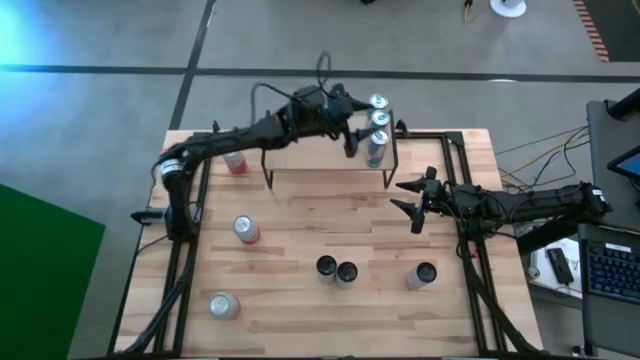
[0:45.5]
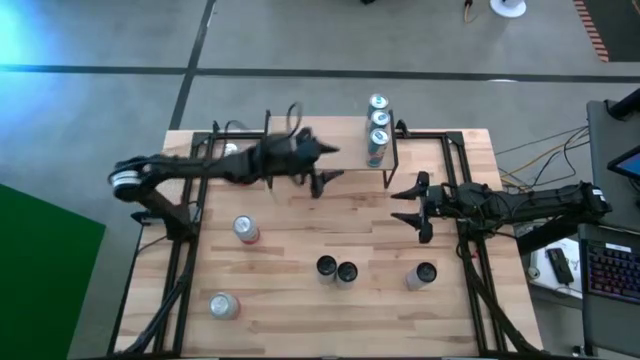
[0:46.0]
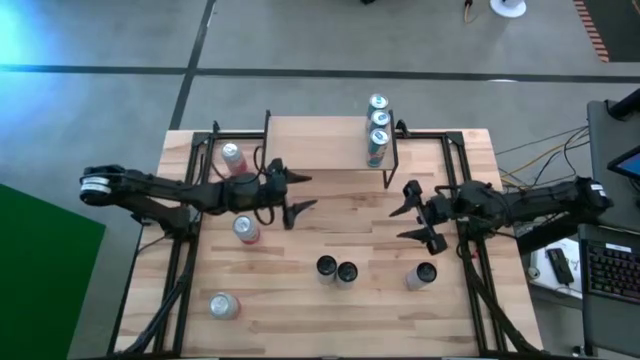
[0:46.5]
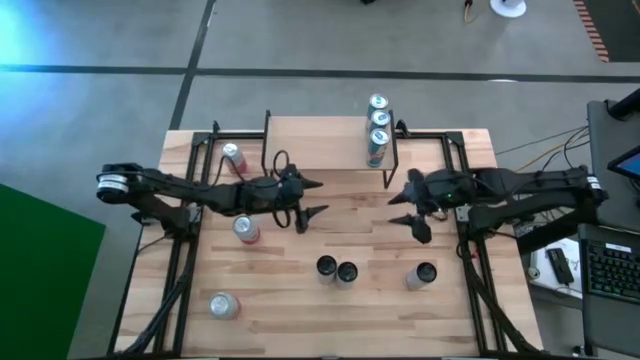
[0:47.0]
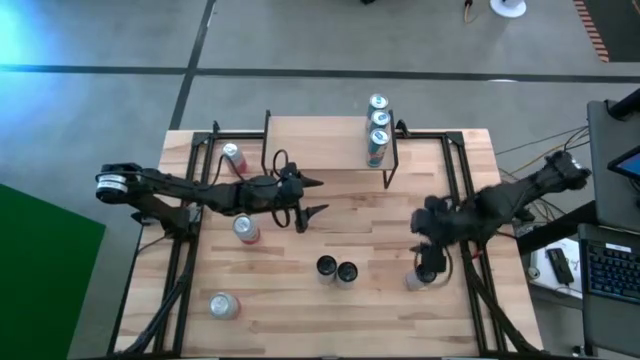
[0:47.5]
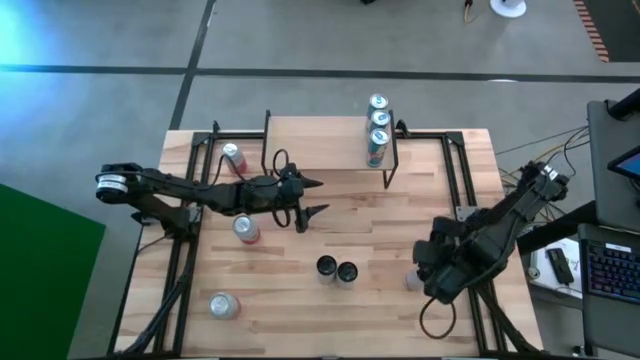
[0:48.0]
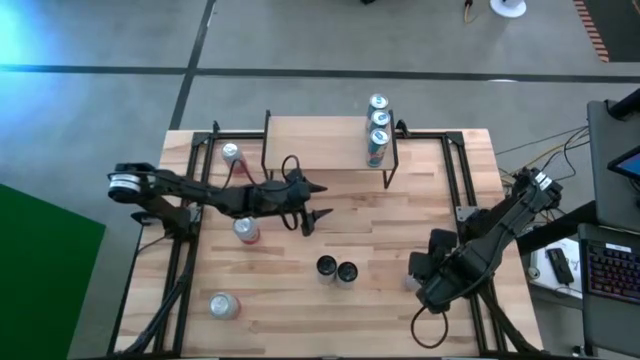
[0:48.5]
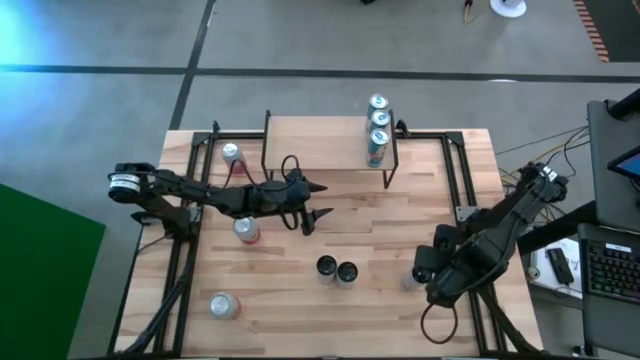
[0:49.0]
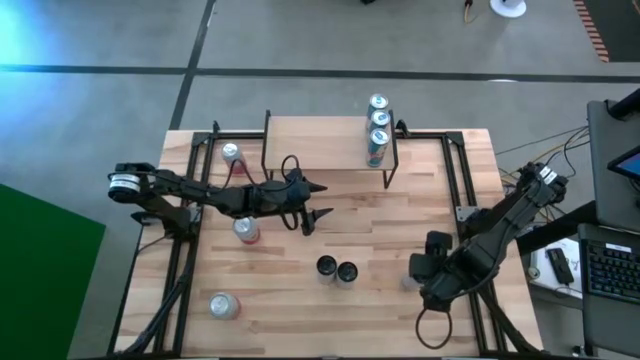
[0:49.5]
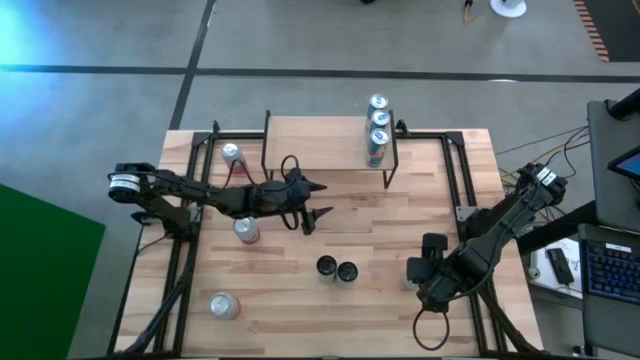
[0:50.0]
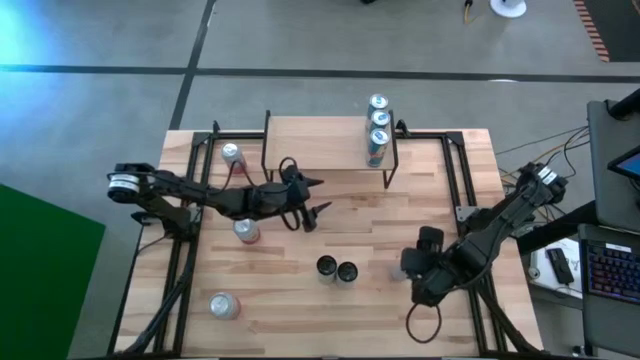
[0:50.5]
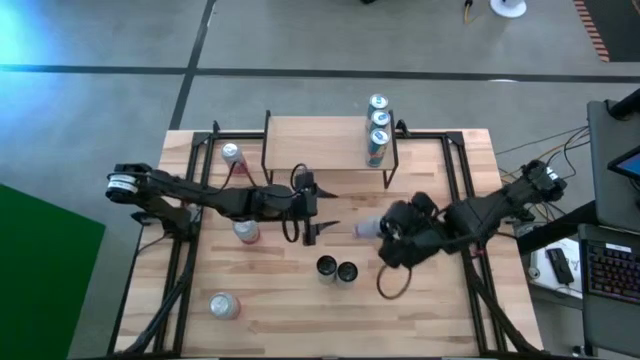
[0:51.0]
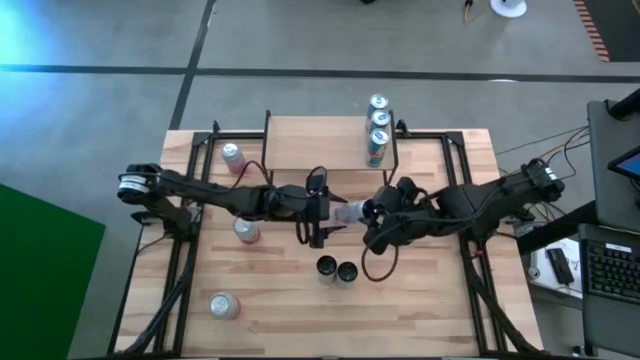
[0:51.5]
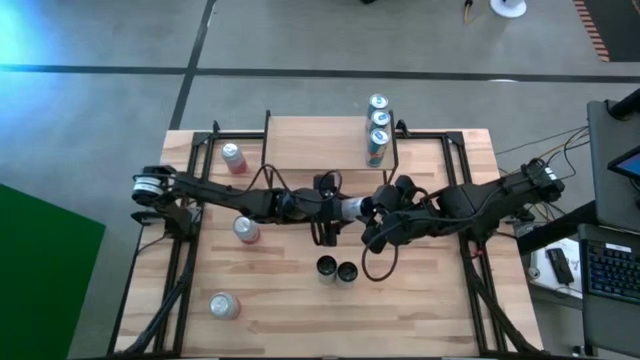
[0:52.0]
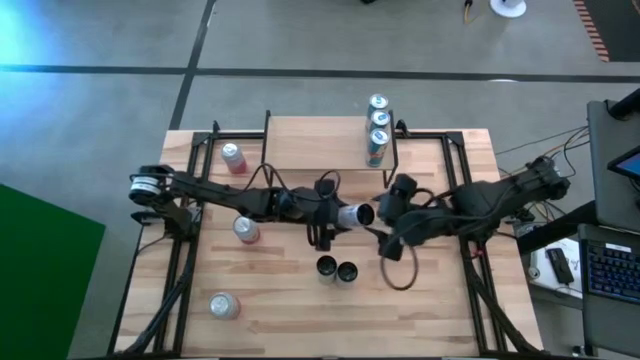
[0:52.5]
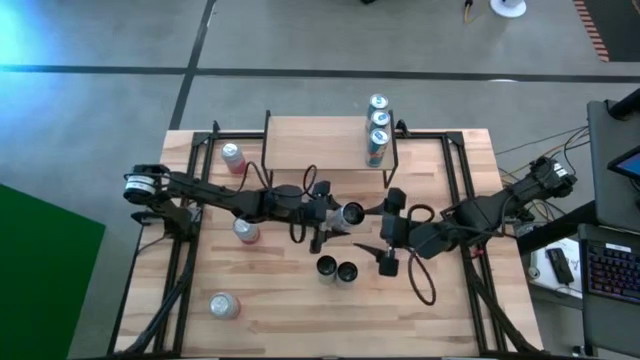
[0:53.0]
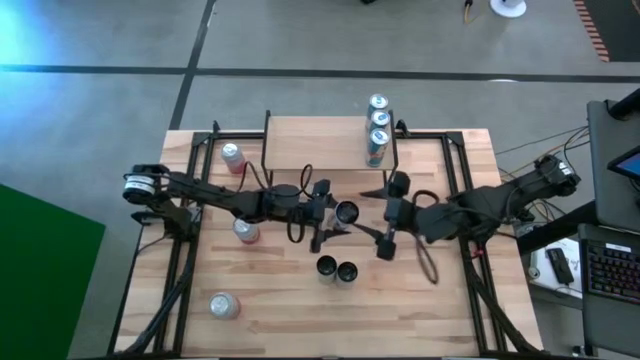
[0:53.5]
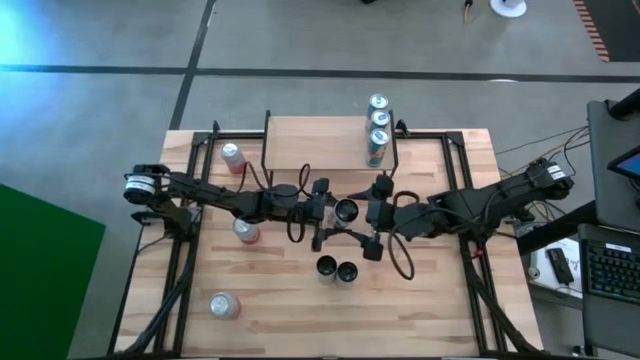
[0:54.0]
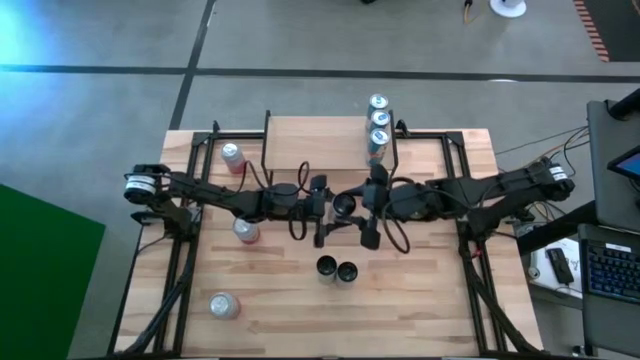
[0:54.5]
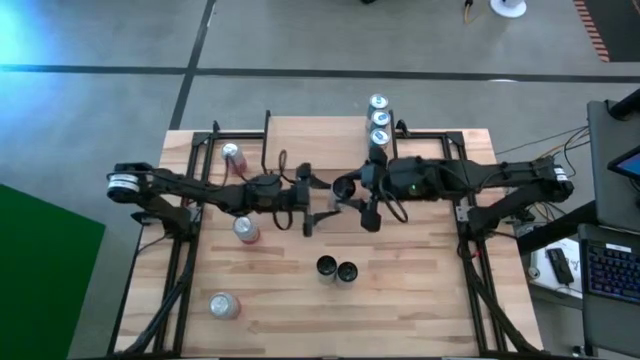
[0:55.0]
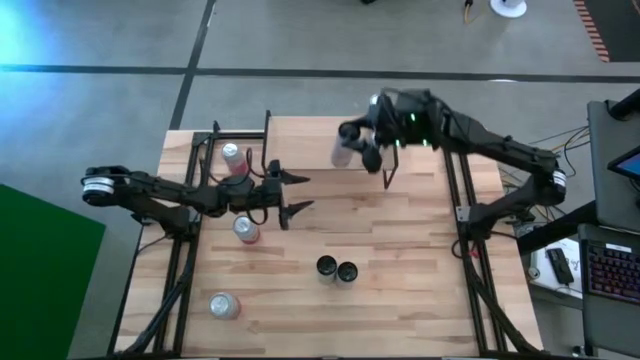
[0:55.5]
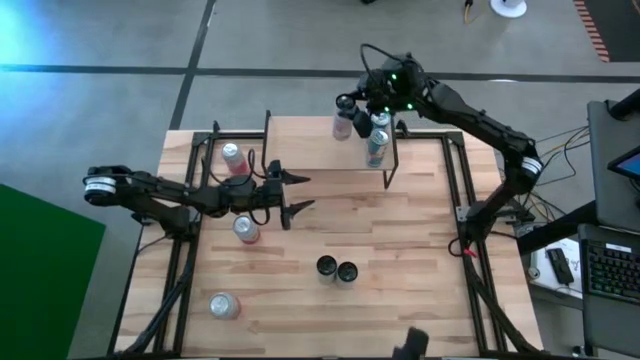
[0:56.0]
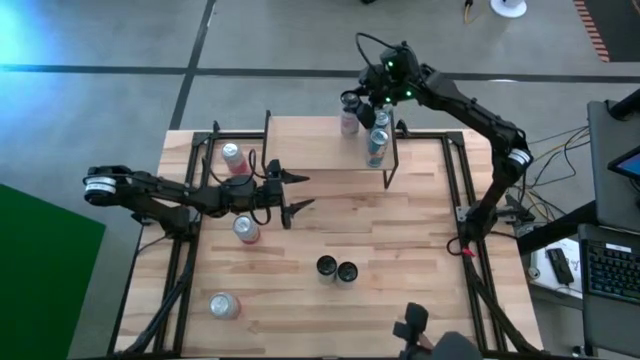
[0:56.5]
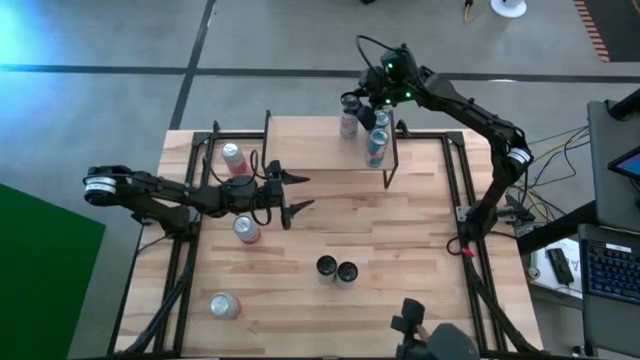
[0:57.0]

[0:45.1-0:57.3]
Task: Place canned beverage on shelf
Put the right white pink soda can on the shelf

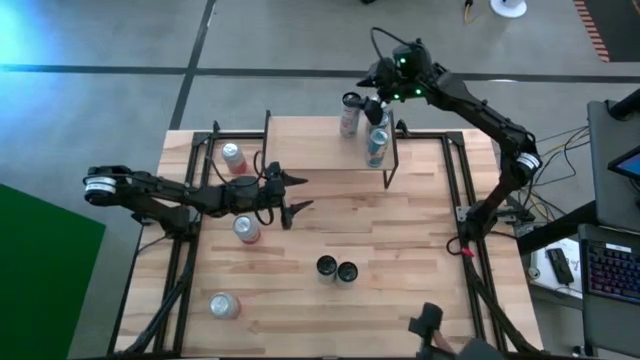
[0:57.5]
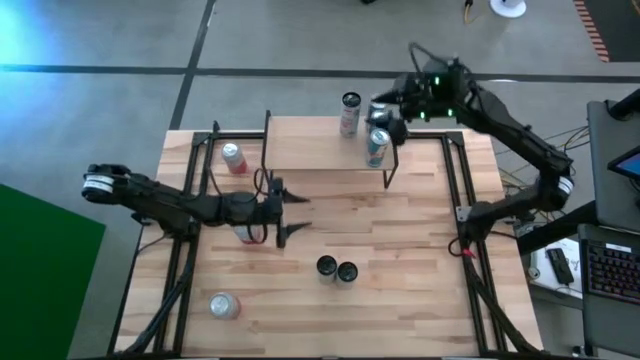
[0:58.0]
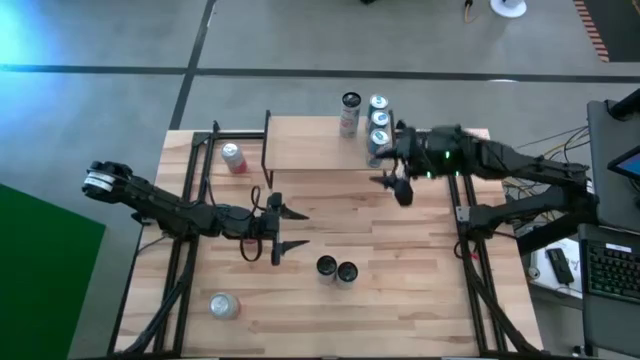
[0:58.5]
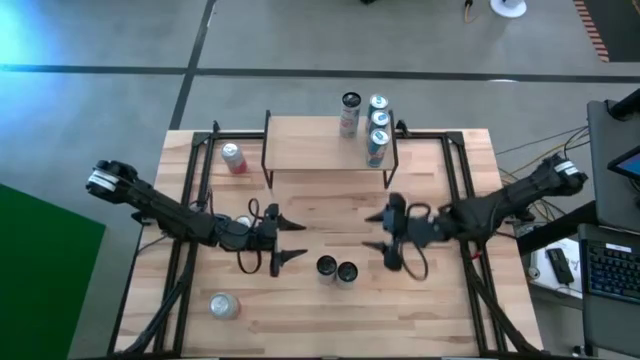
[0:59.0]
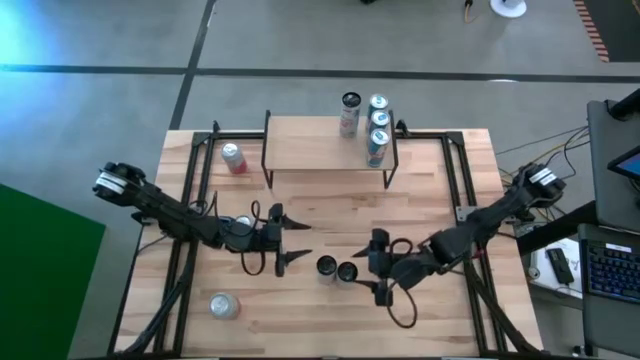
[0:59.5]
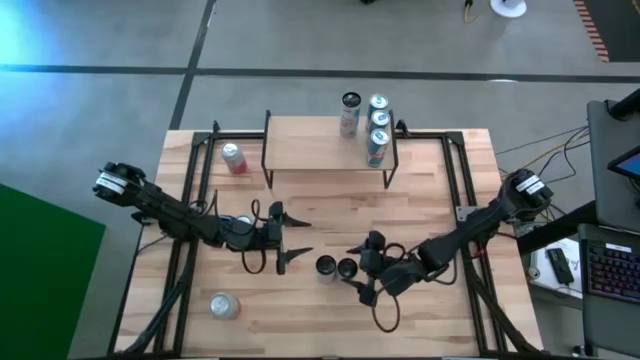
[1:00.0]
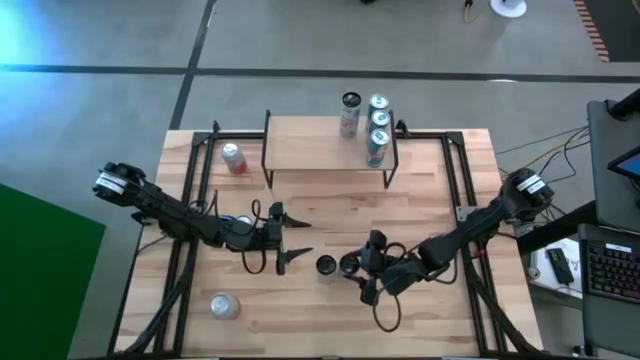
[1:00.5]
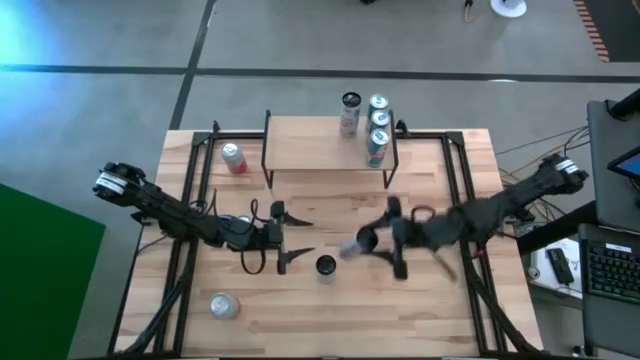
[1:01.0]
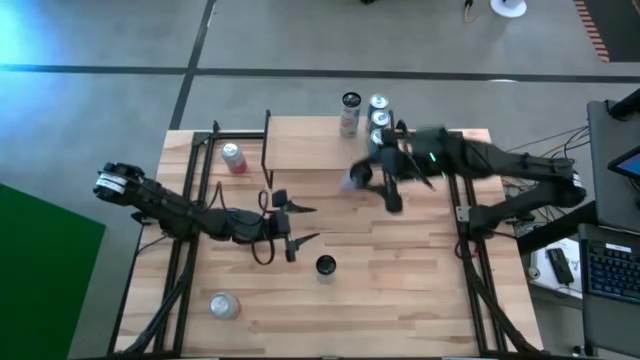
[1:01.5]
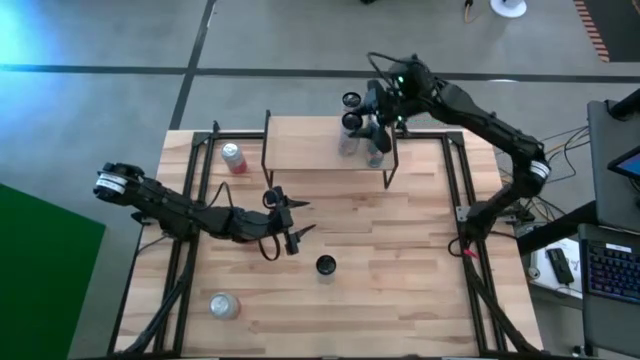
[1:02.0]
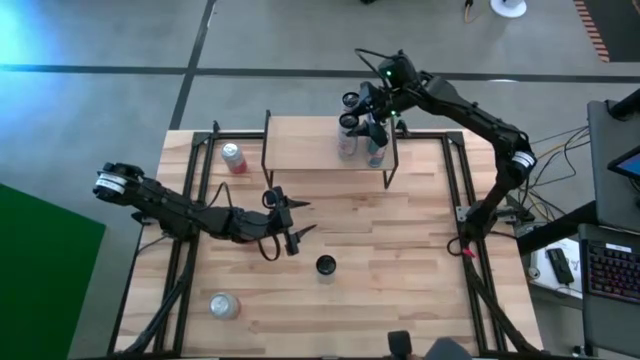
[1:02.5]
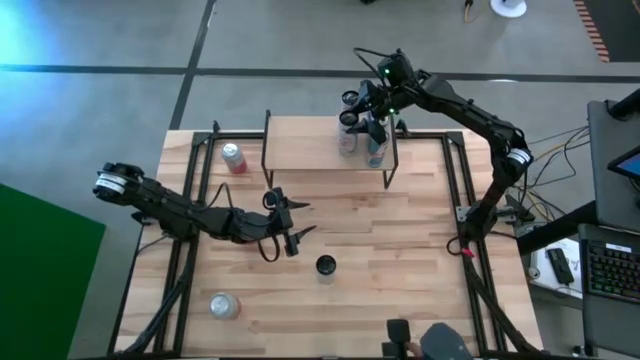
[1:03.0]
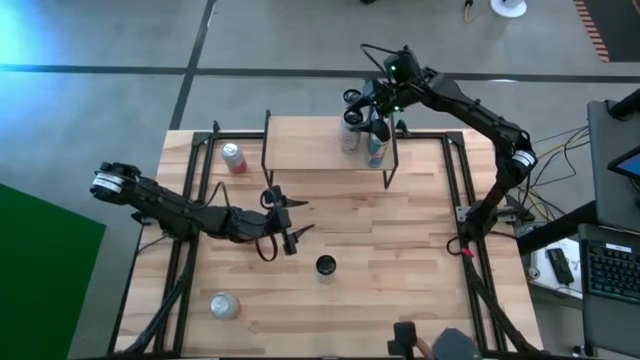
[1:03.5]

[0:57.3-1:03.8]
Put the right white pink soda can on the shelf aligned with the other white pink soda can

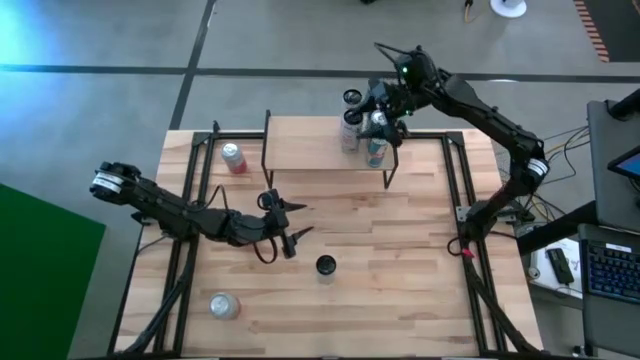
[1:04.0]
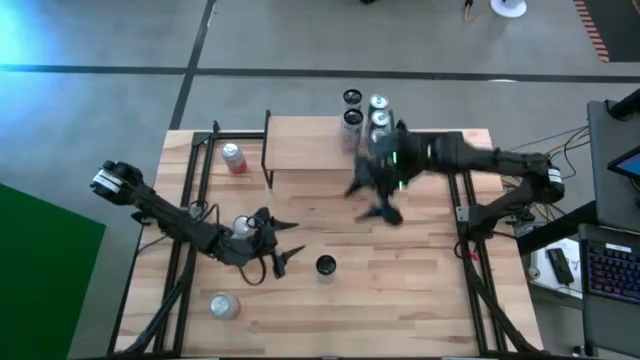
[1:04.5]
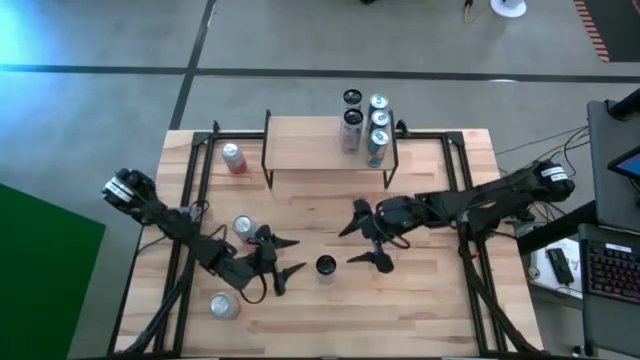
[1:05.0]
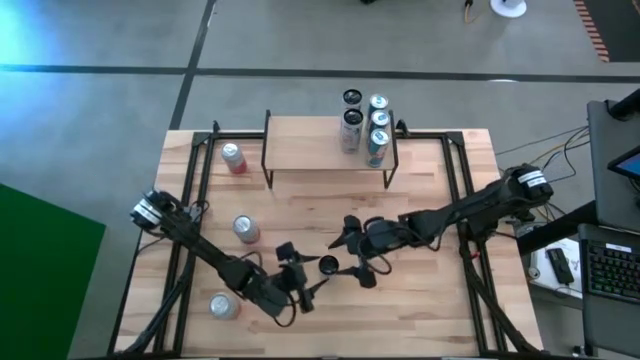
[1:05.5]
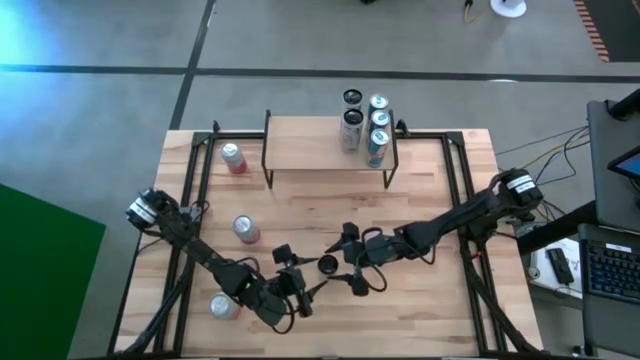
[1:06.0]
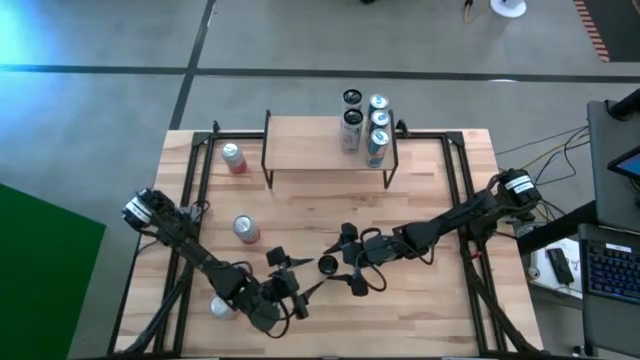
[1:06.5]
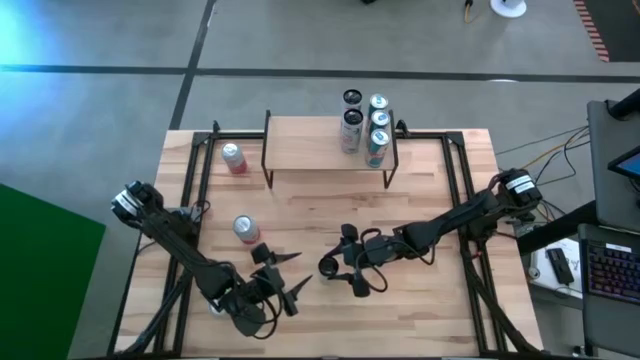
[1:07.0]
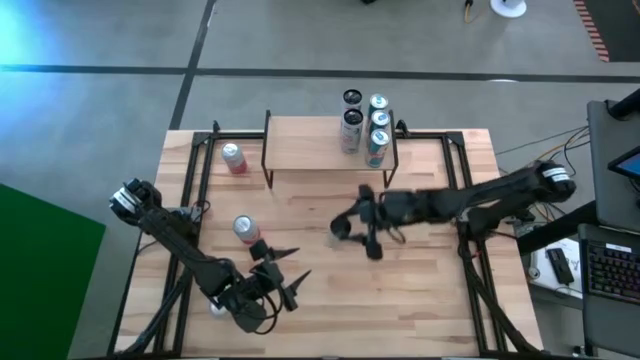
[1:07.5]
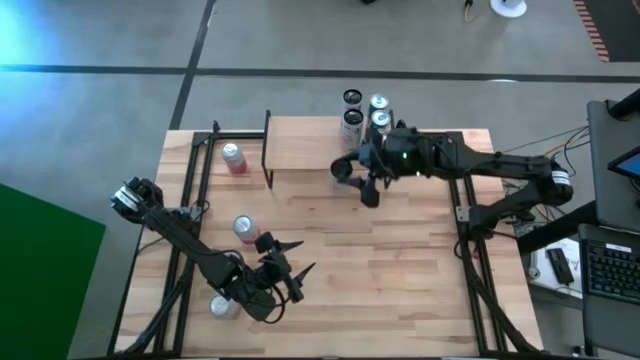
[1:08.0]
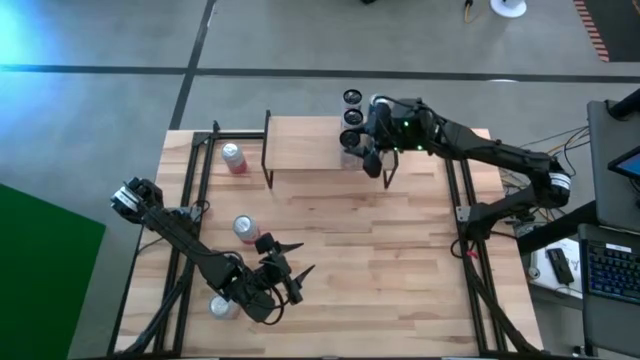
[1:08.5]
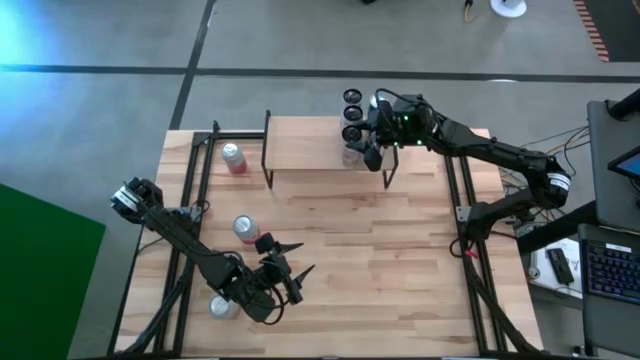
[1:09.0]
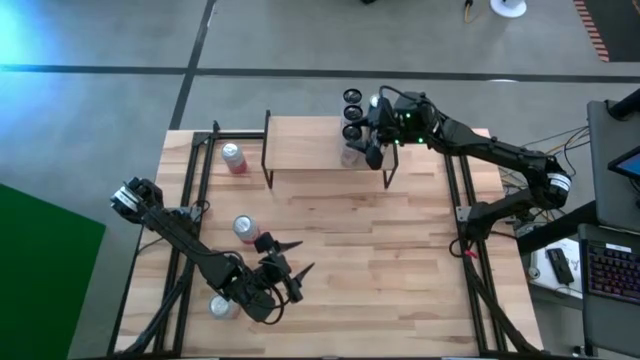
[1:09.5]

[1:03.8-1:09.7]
Put the right white pink soda can on the shelf aligned with the other white pink soda cans
